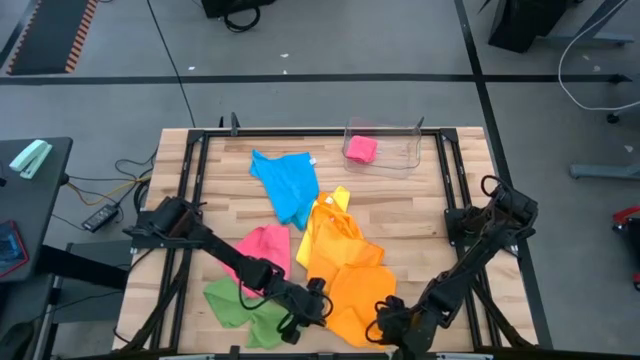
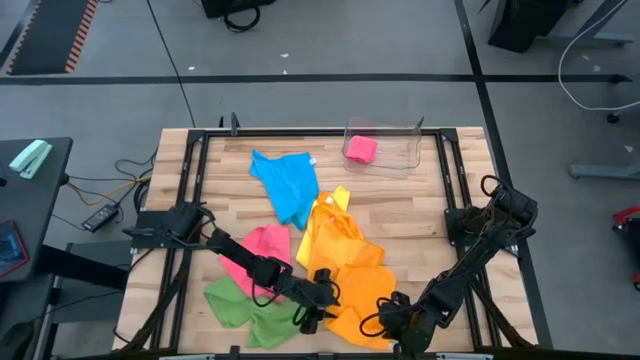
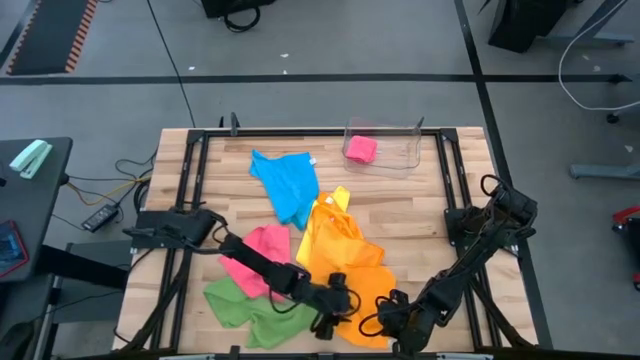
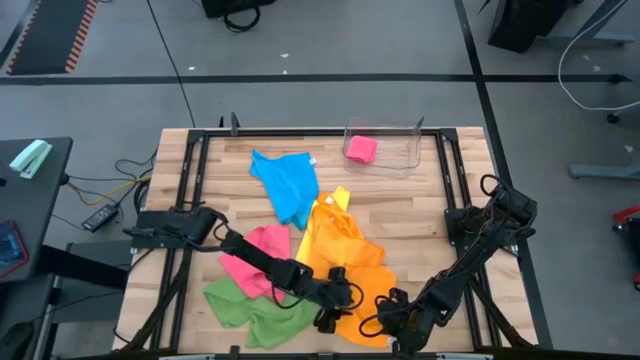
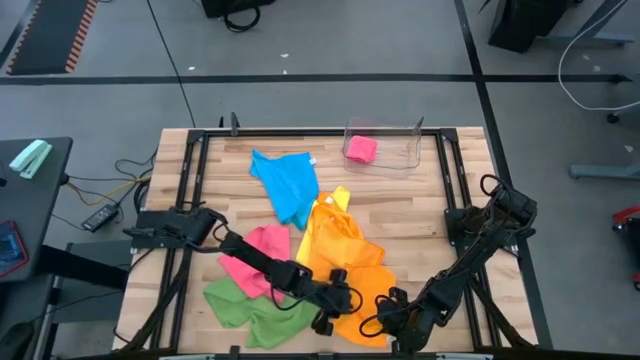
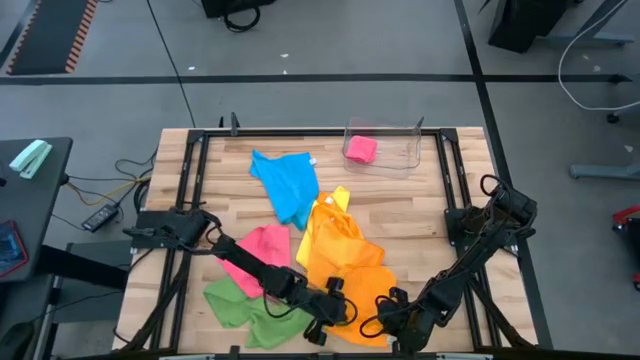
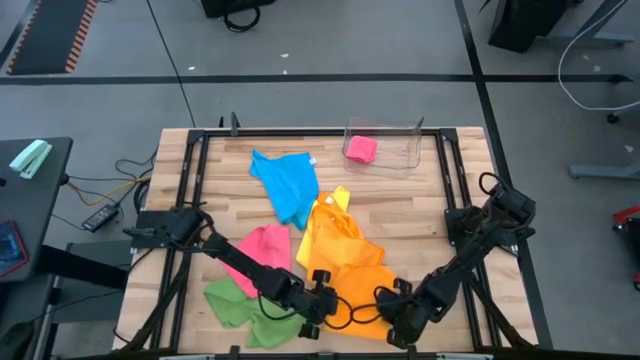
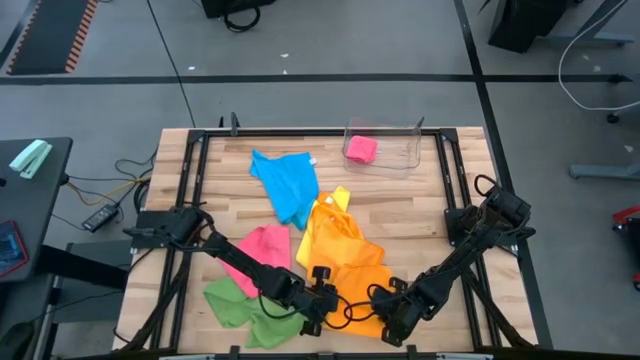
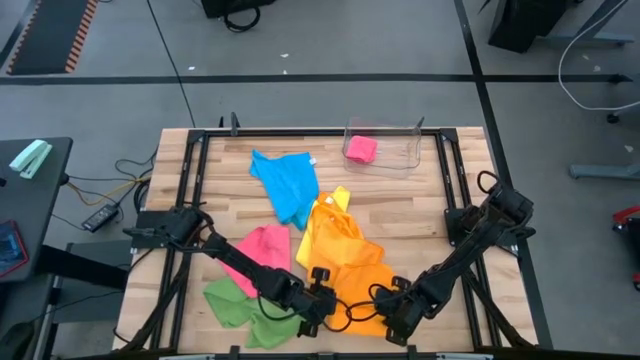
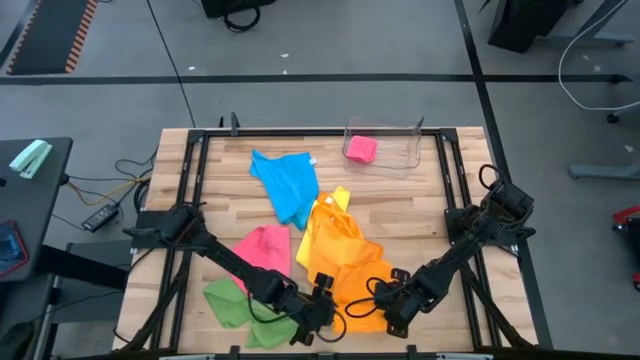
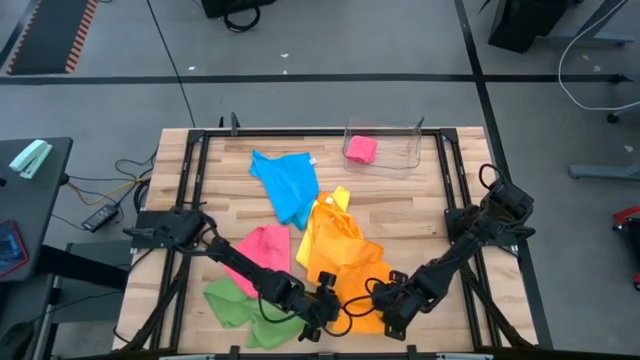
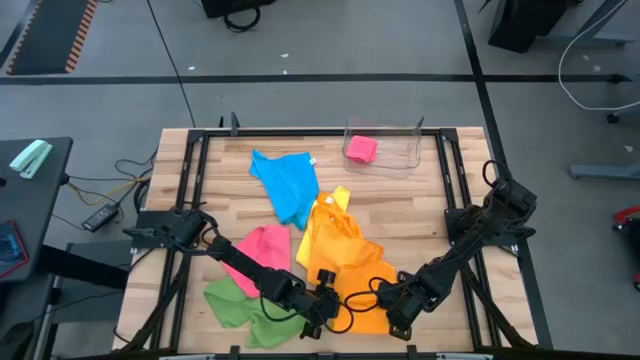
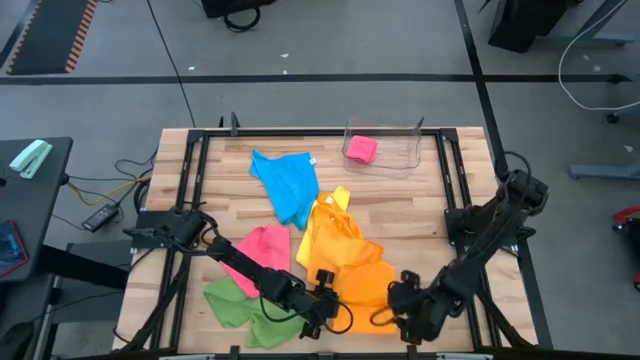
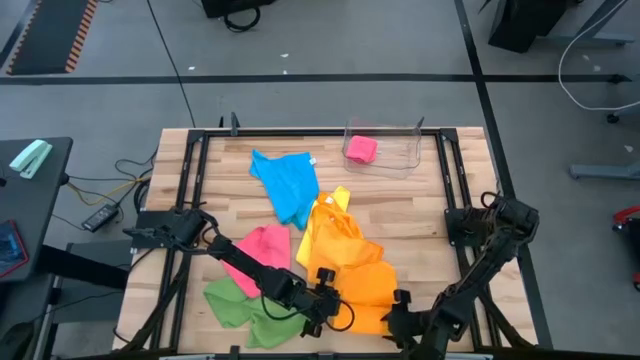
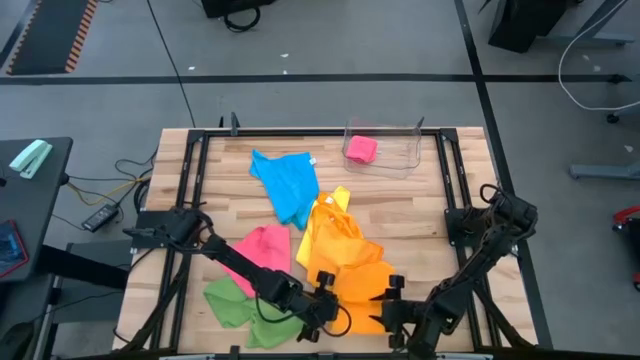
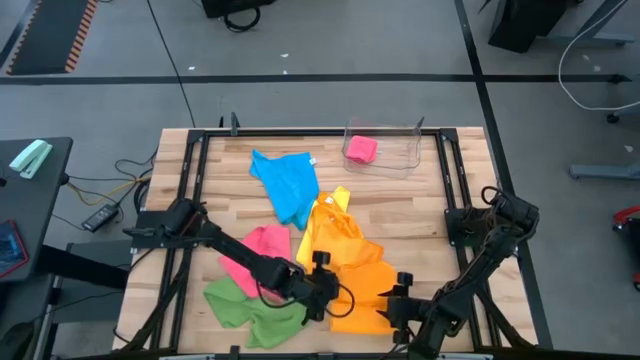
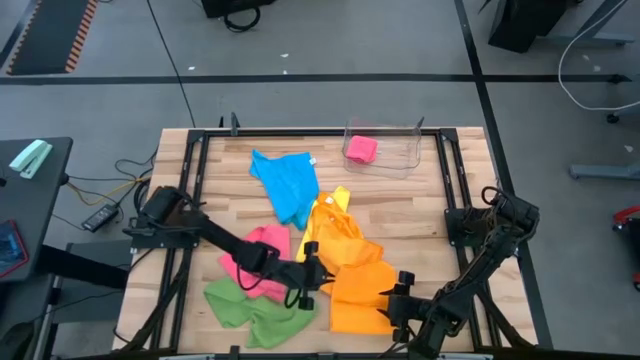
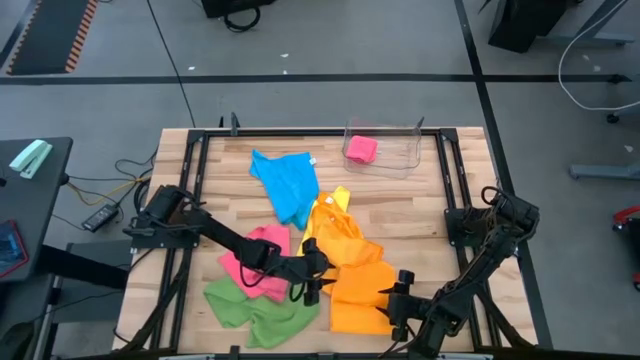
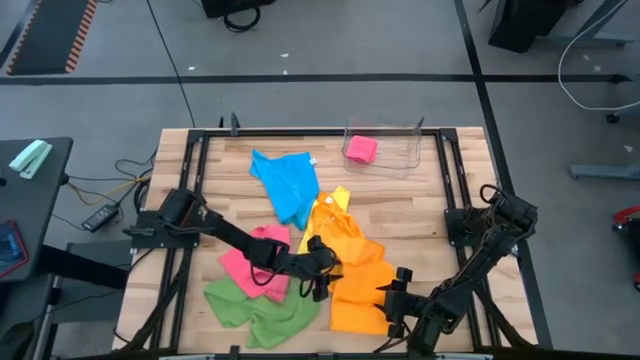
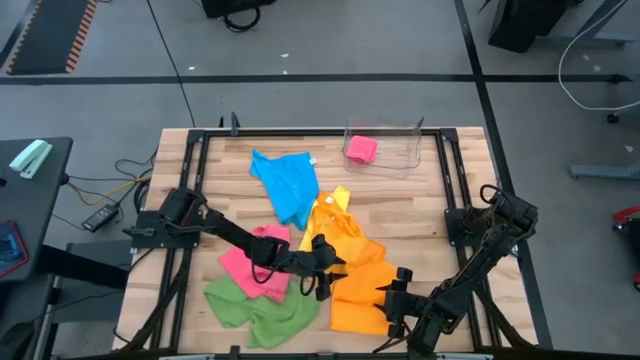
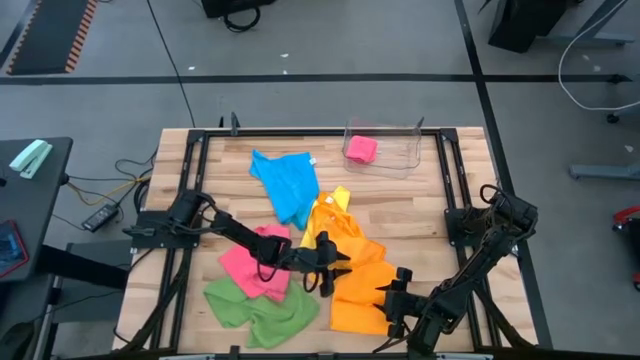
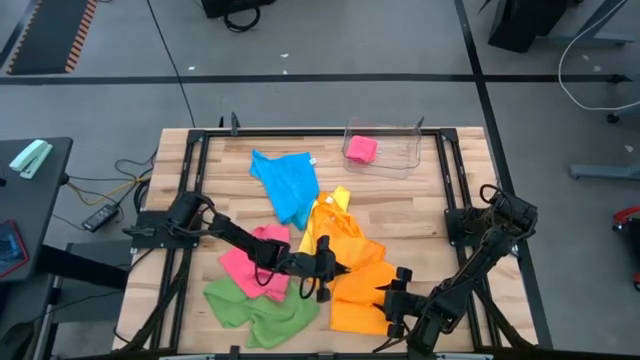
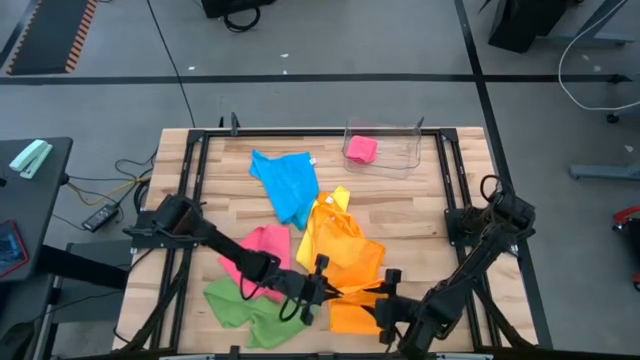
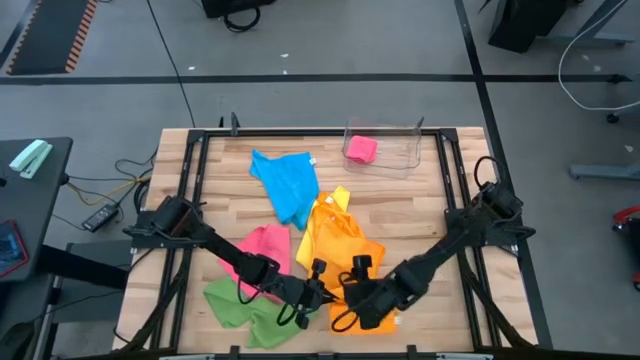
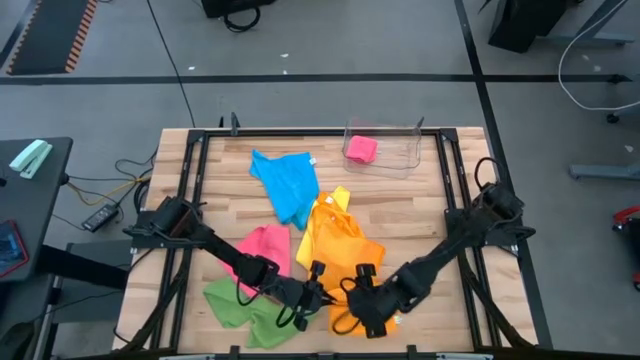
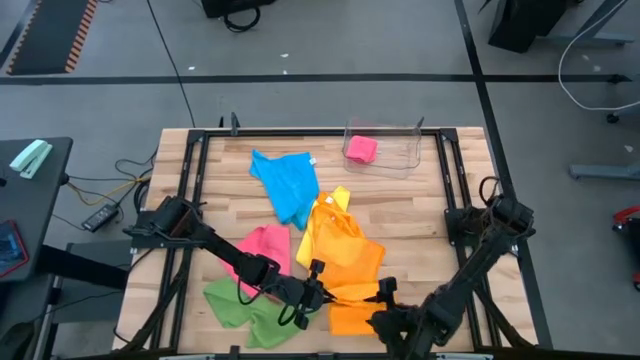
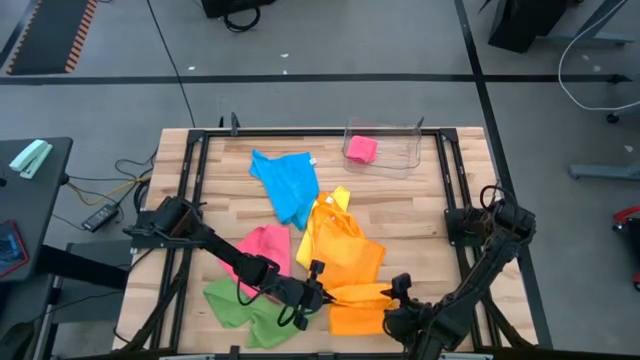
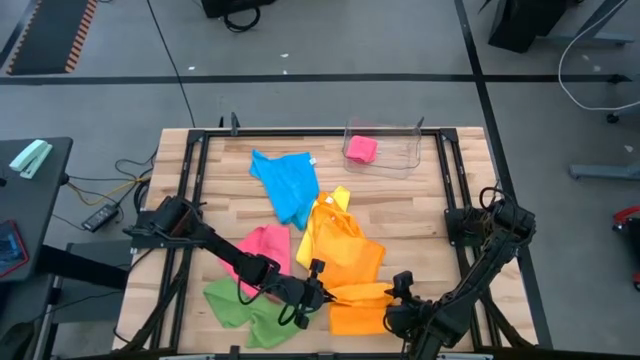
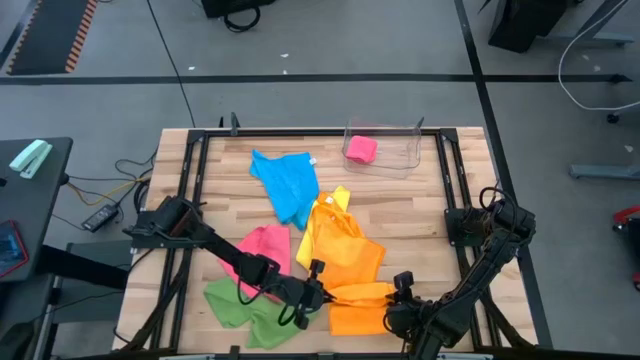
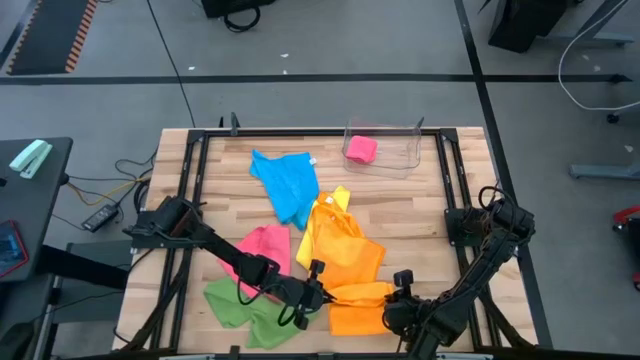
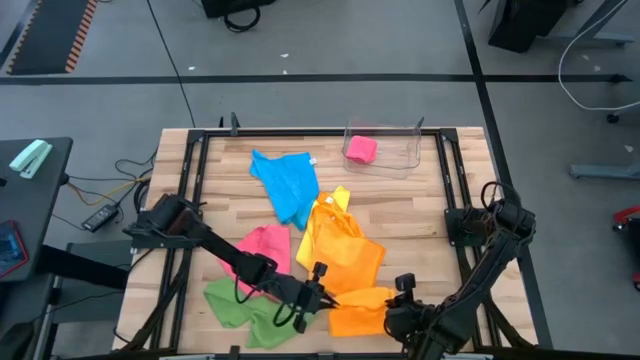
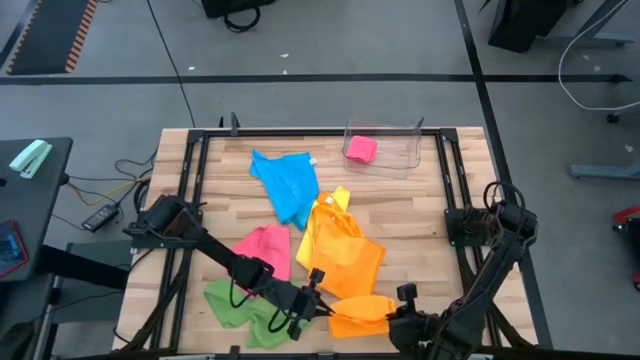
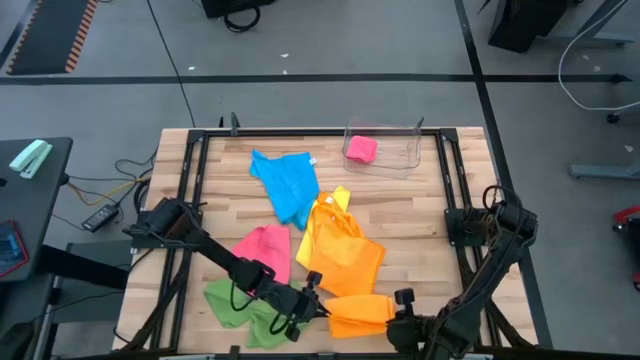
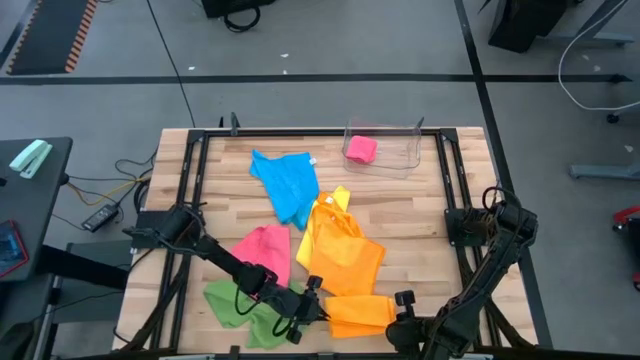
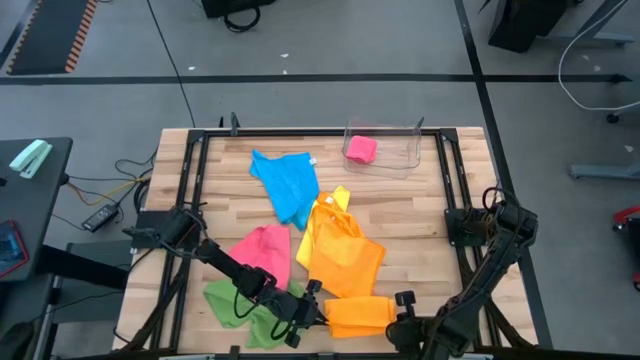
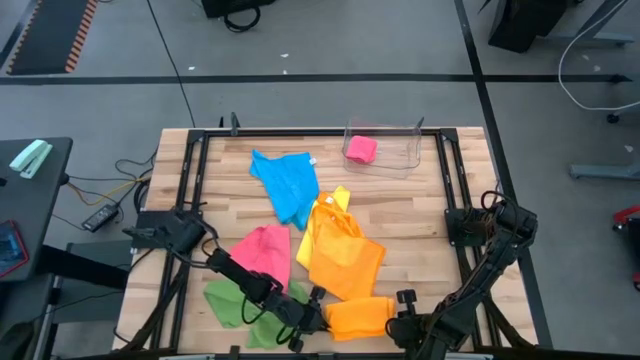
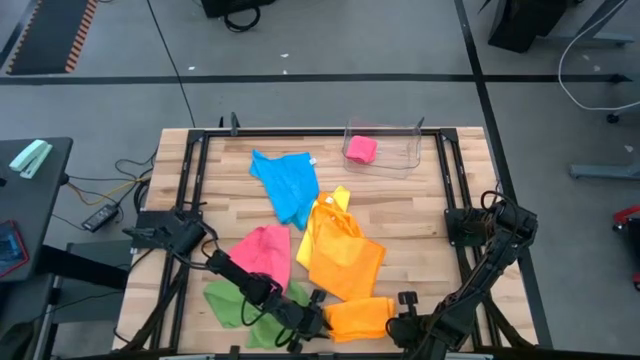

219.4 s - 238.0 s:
Task: Fold microfiber towels
Fold the right orange microfiber cloth
